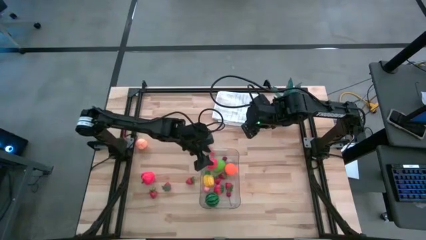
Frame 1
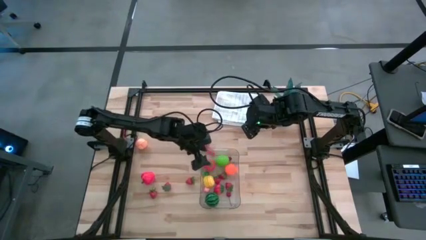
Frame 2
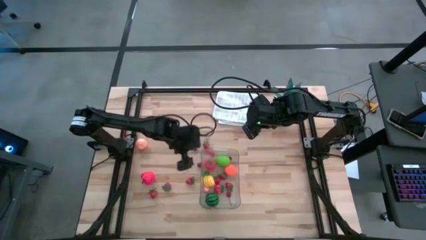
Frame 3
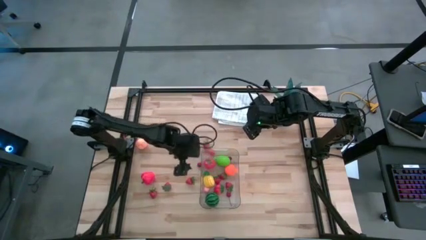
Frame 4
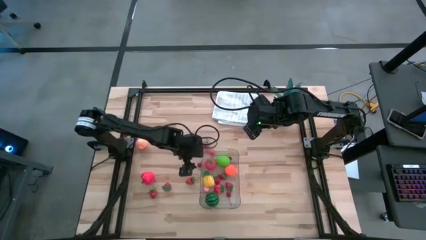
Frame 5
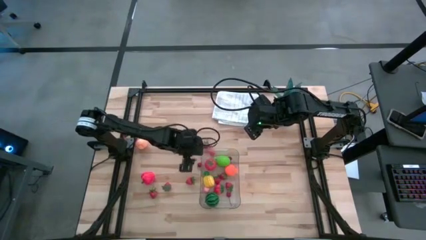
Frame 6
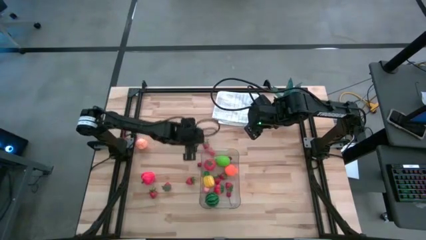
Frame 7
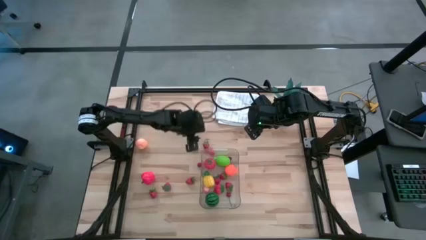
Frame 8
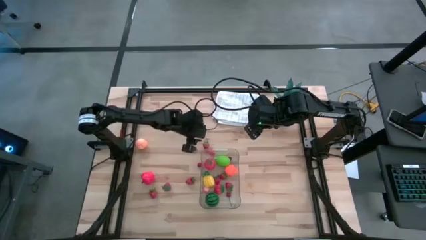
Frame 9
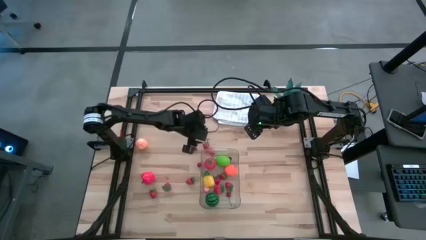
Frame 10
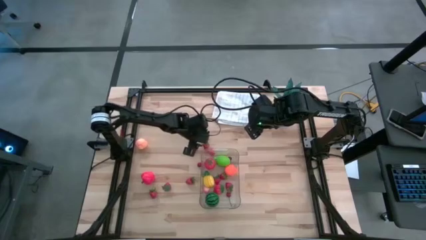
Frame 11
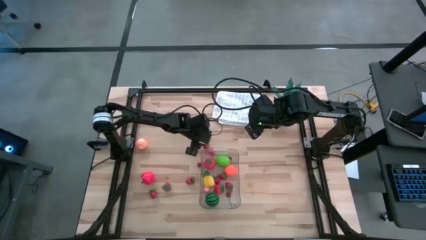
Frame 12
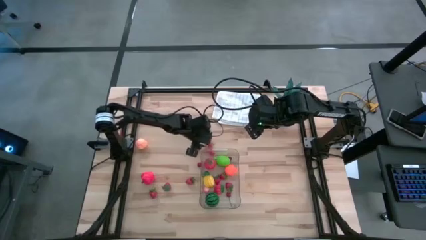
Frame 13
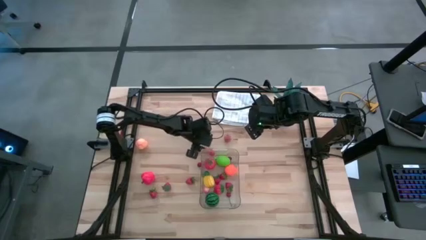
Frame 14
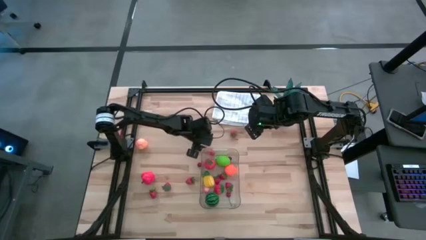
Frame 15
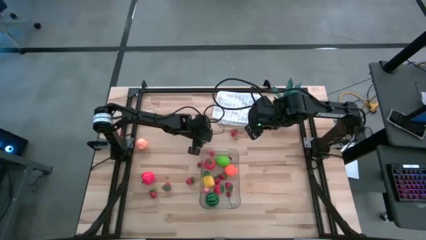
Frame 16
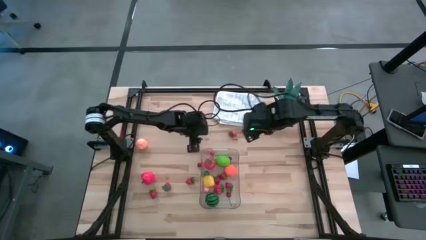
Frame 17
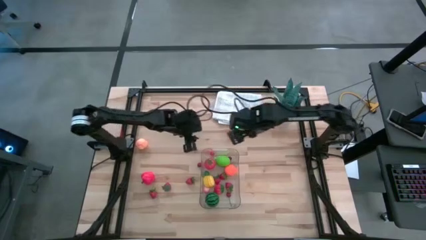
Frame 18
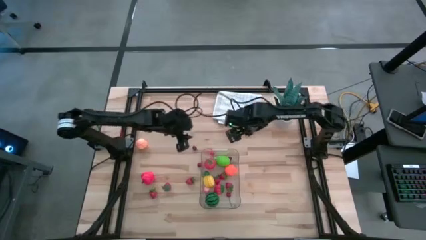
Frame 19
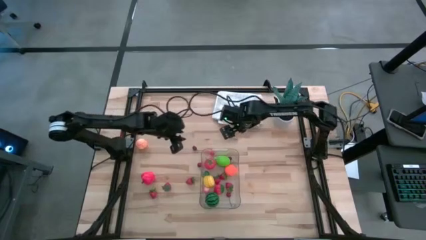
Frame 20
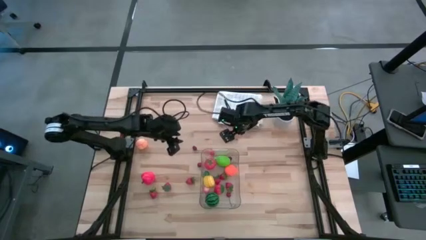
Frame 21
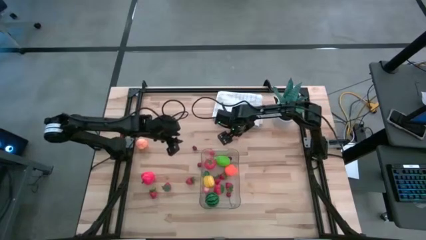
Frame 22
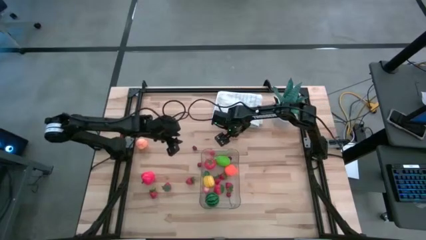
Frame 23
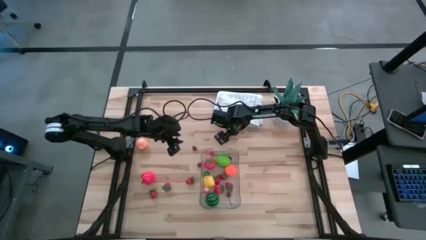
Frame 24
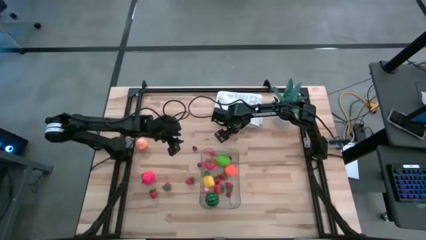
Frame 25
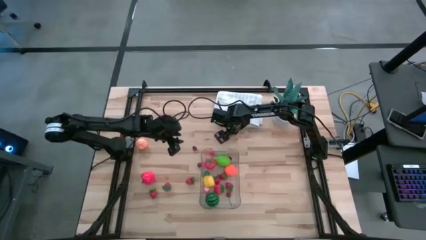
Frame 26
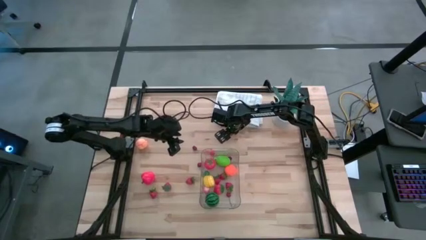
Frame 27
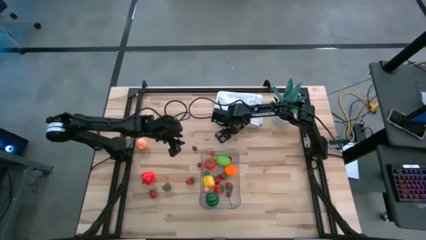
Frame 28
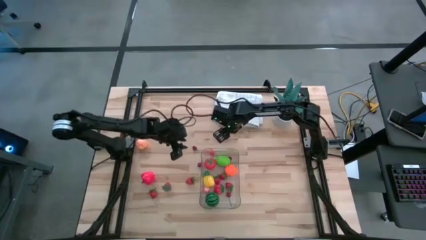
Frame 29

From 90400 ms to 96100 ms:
Task: Pick and placing Produce into tupperware
Put the red strawberry into the transparent bin

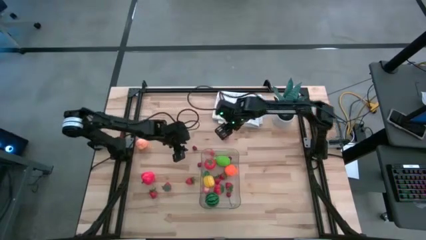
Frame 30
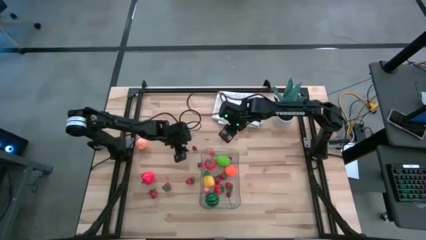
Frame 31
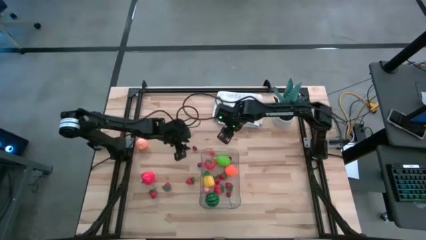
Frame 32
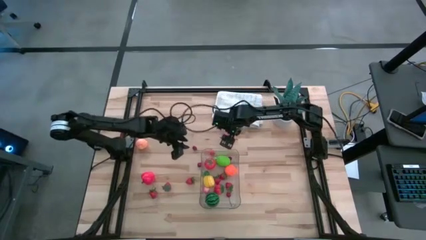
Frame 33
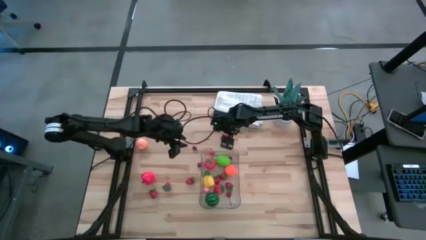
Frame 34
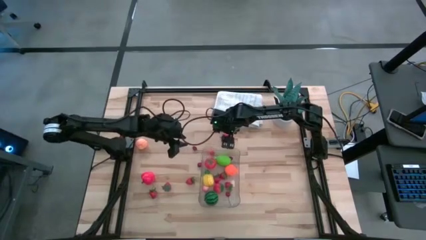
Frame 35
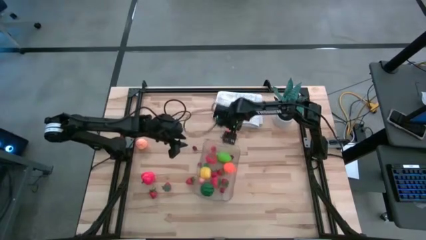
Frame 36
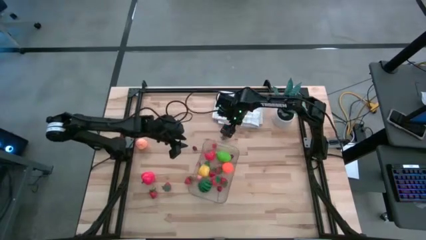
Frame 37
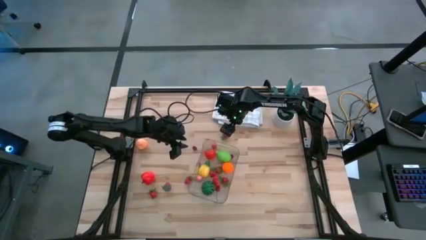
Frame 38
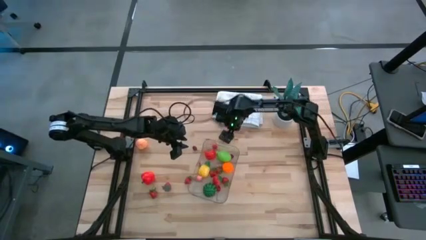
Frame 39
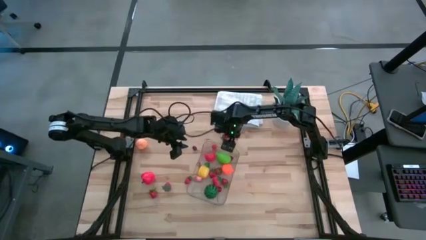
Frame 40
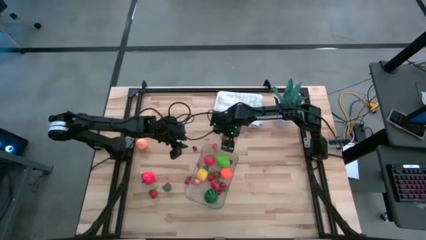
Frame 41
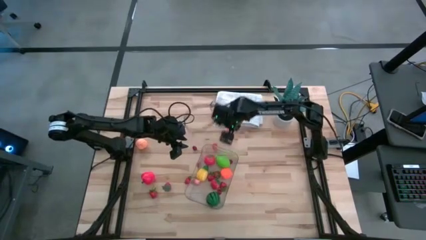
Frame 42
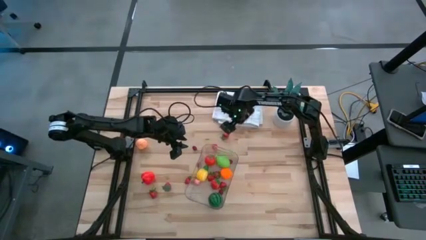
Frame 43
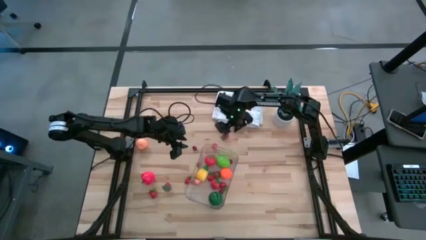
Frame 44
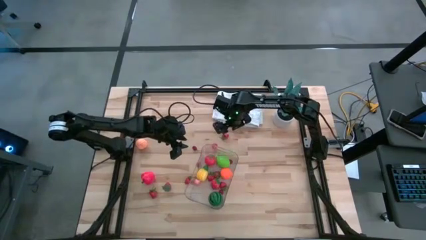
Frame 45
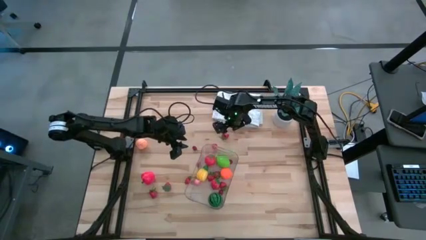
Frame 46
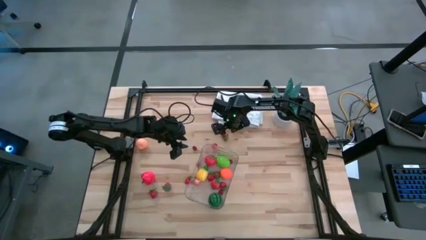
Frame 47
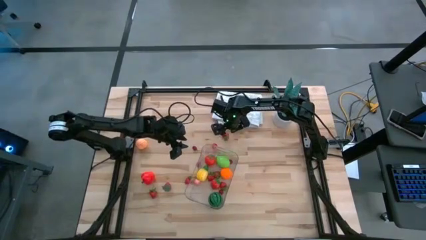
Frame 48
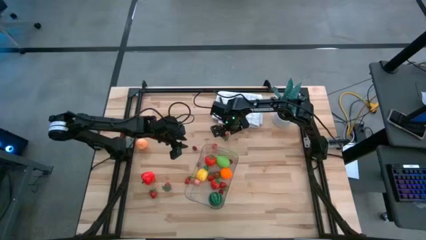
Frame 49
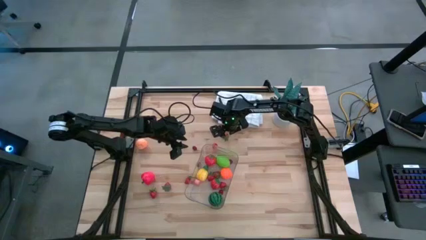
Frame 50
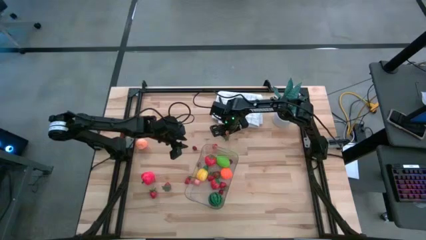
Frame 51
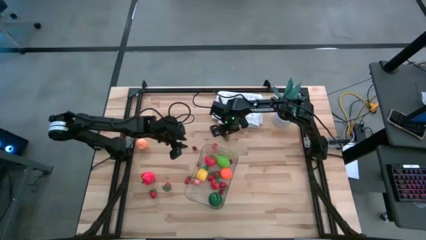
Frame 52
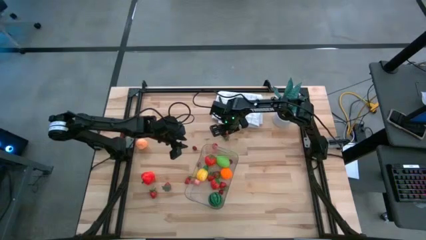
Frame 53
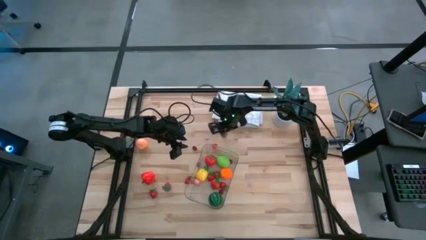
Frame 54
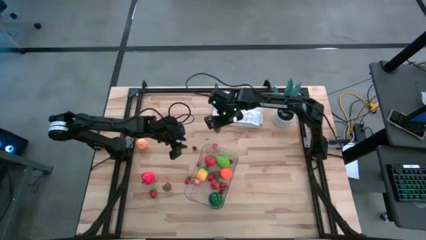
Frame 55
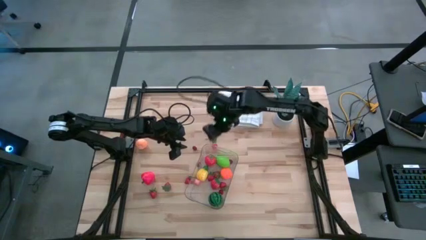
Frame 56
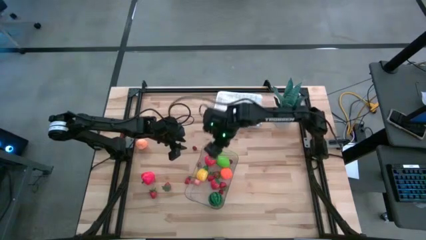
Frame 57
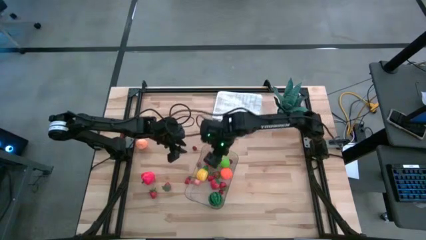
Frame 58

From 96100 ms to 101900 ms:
Put the red strawberry into the transparent bin

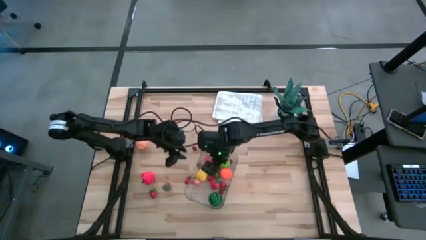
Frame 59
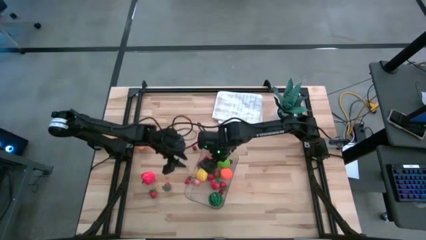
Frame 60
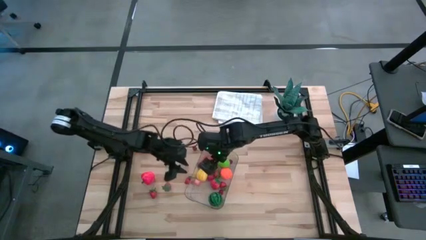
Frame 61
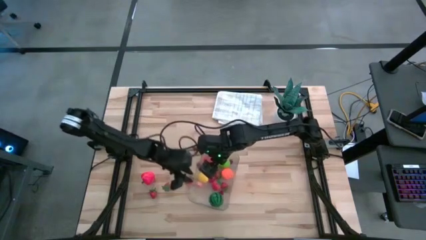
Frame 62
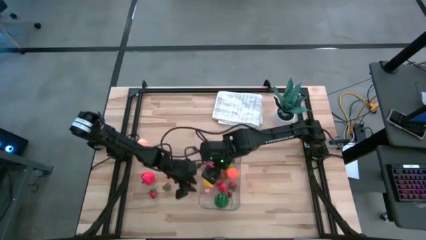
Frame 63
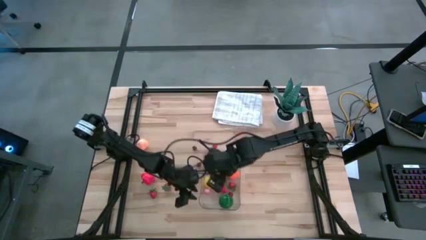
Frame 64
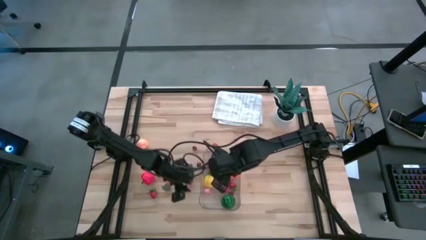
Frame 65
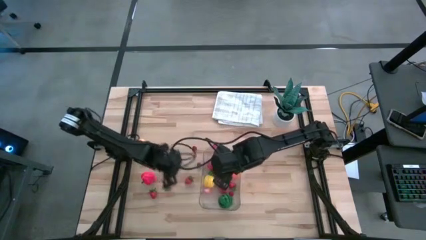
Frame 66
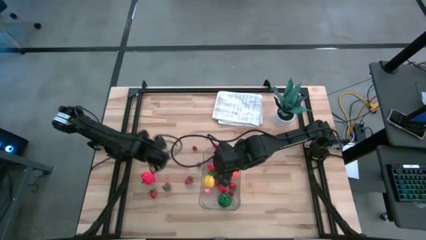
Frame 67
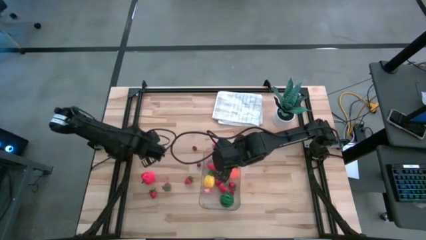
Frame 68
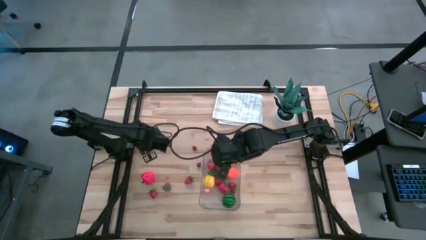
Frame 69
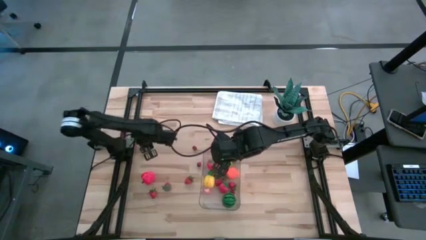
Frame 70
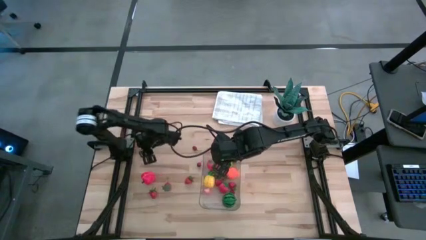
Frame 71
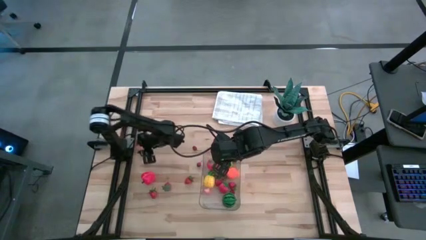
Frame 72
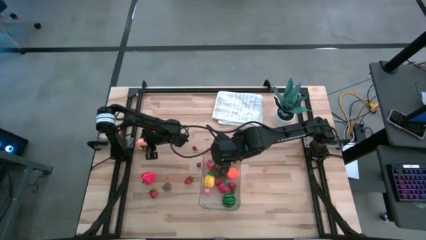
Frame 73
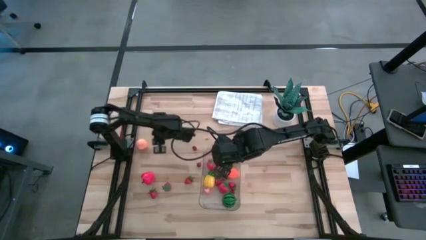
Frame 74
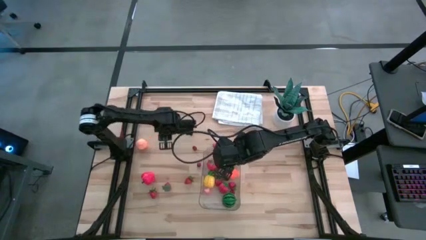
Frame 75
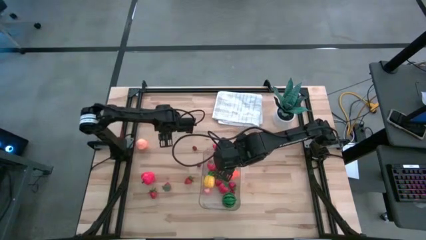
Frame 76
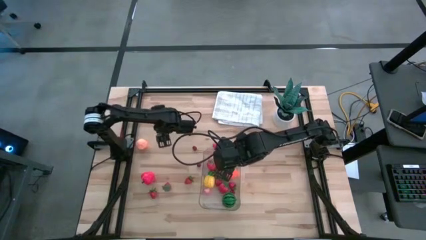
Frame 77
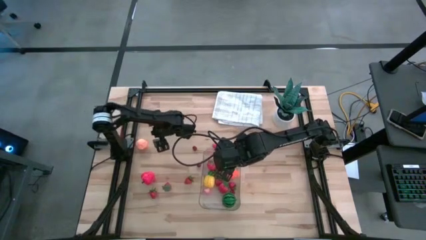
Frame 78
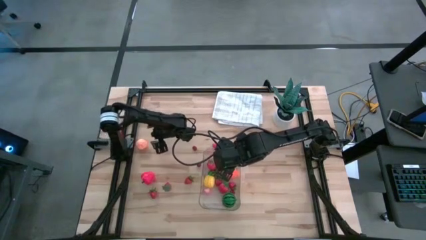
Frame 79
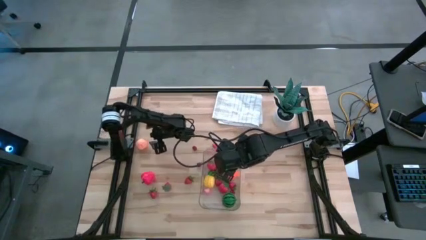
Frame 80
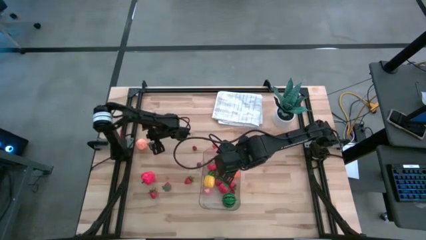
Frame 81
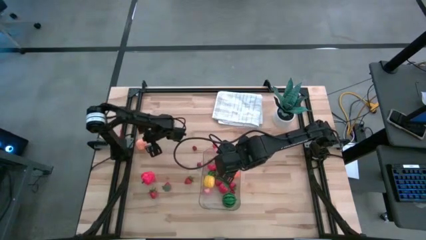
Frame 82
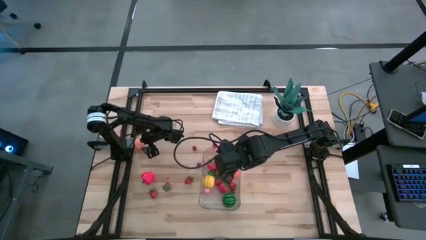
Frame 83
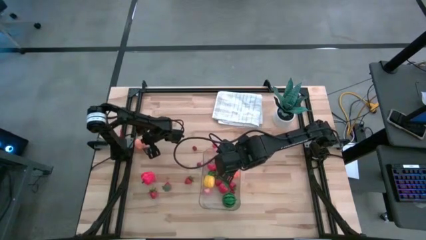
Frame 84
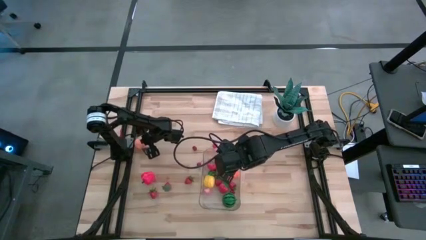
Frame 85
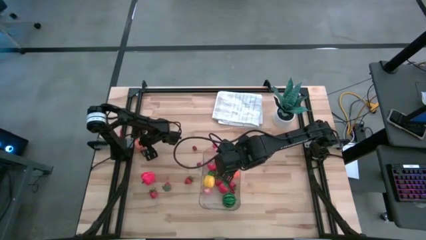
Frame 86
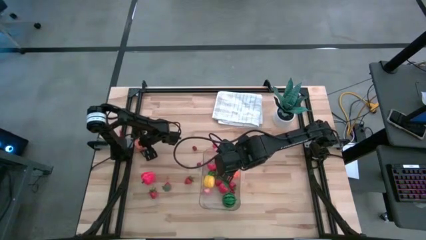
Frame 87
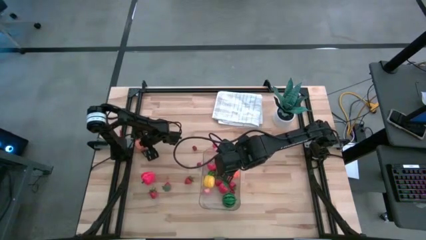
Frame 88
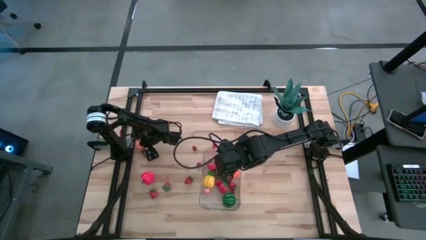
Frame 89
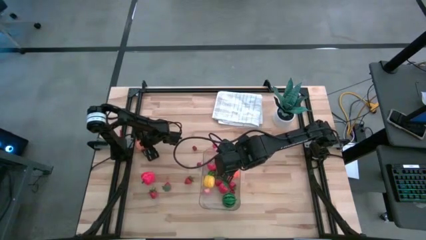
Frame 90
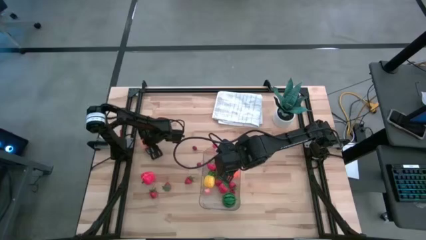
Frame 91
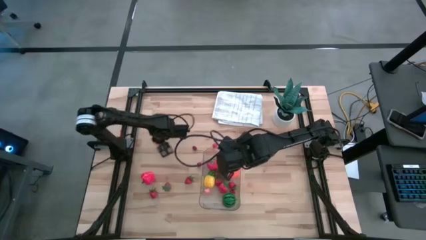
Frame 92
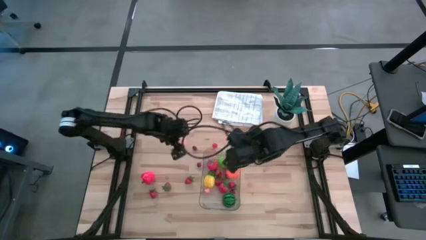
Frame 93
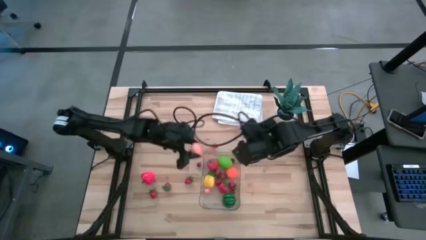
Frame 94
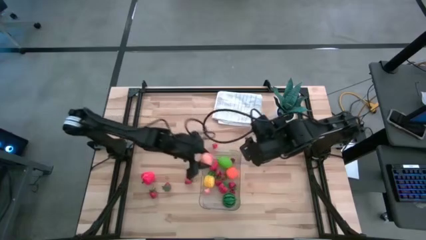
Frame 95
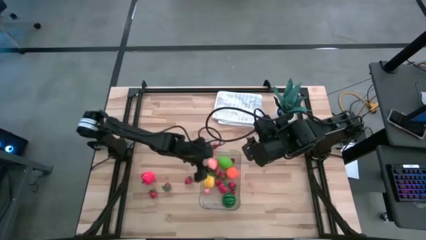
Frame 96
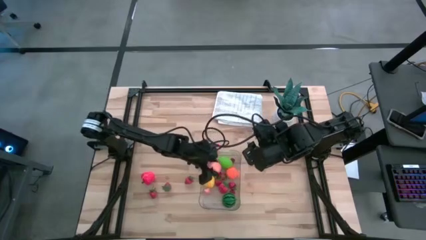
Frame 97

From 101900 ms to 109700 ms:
Put the pink peach into the transparent bin
